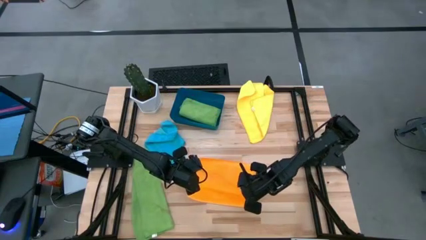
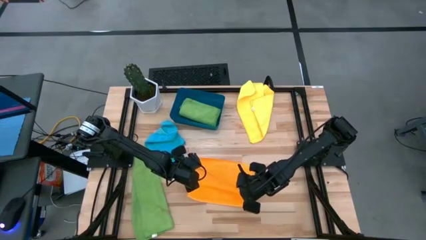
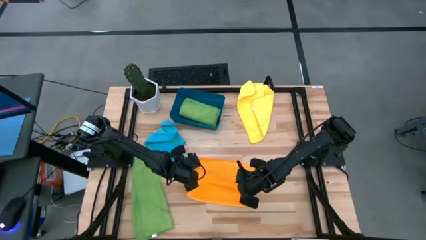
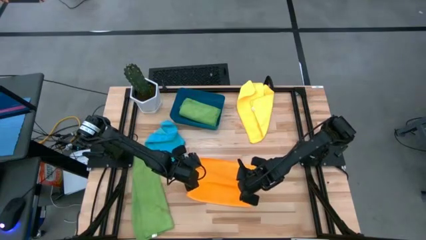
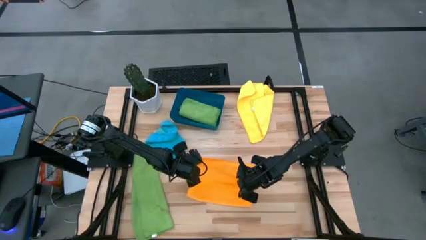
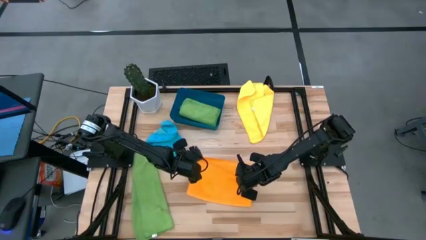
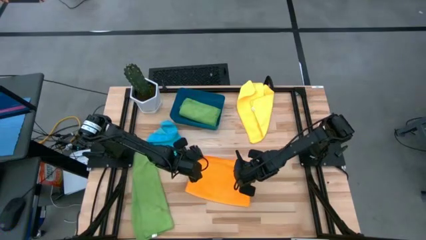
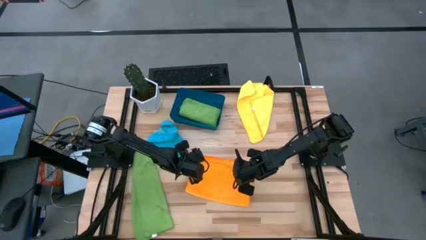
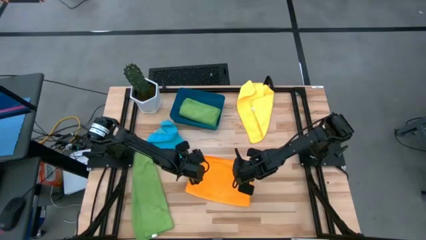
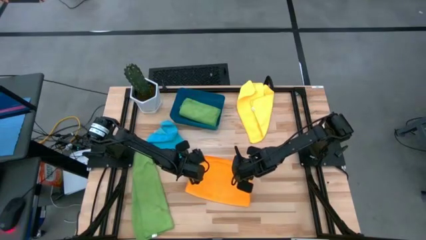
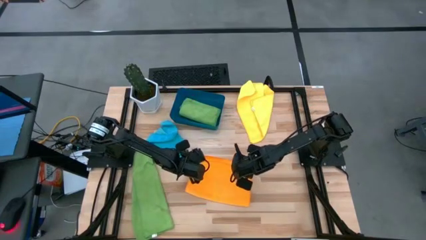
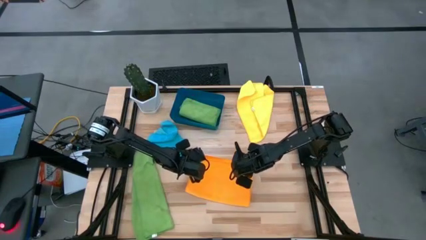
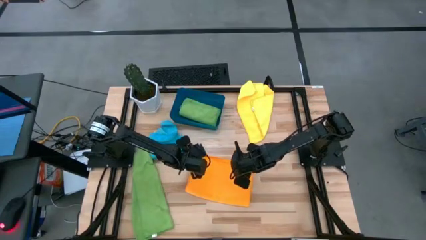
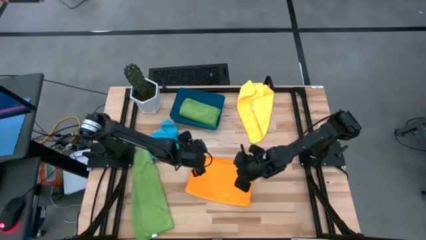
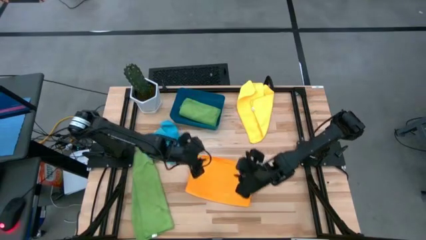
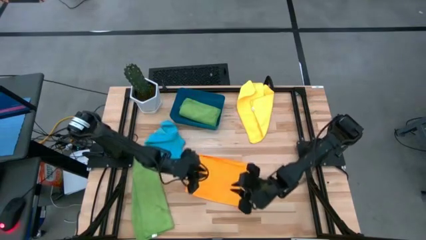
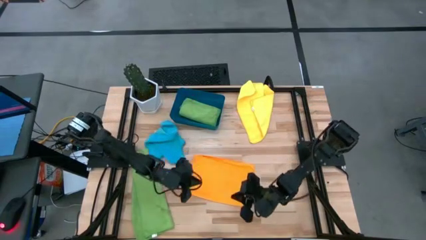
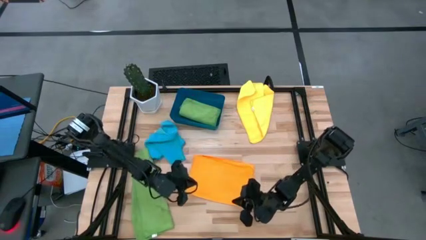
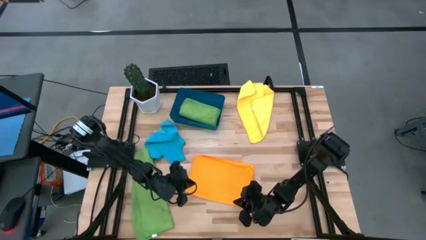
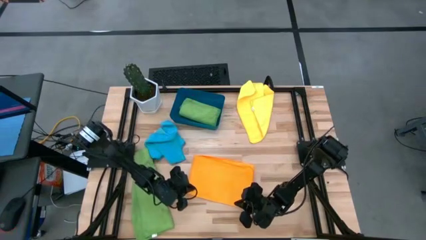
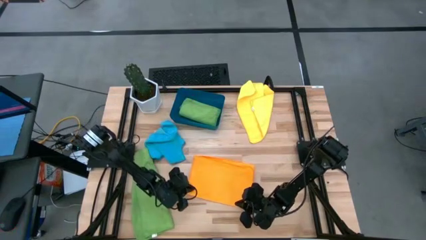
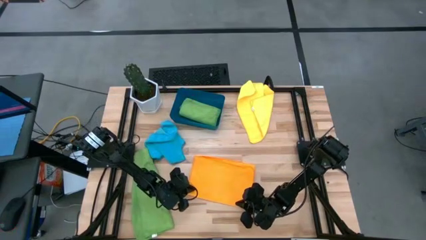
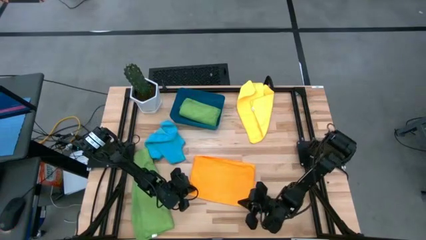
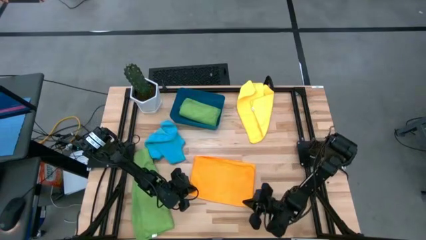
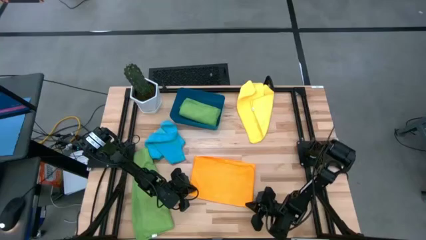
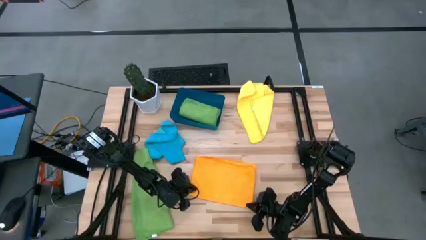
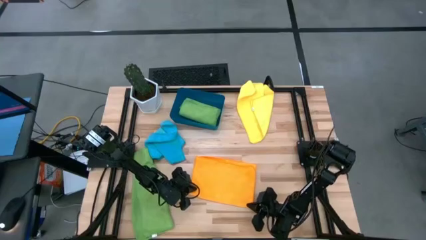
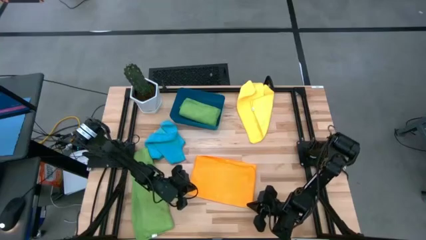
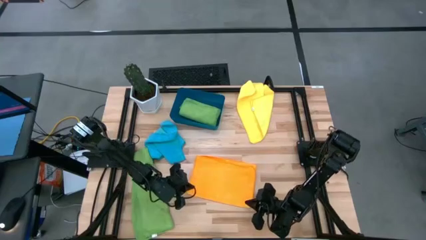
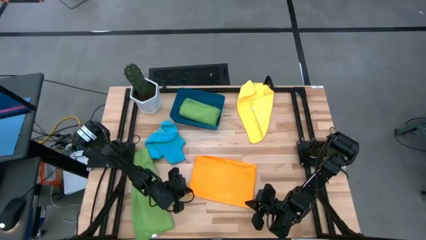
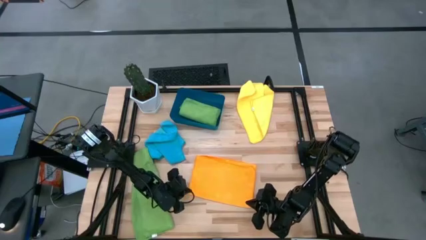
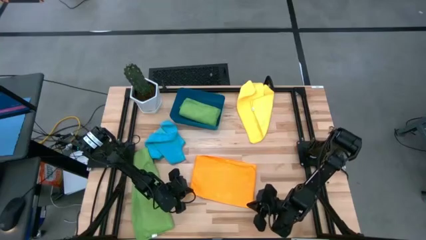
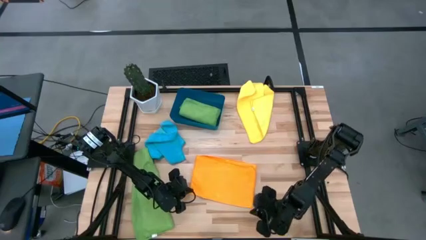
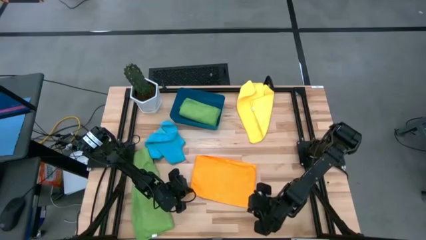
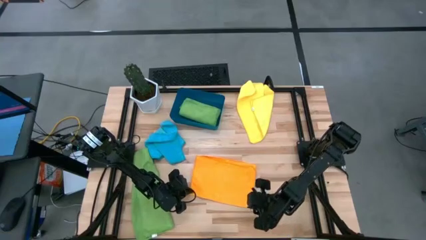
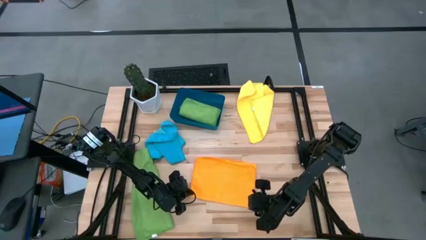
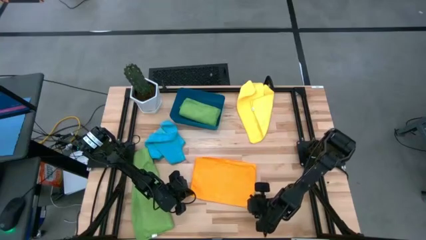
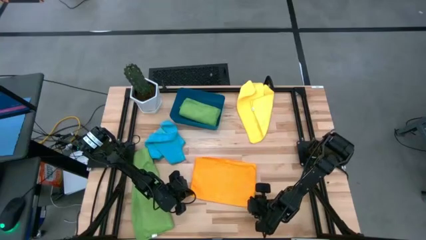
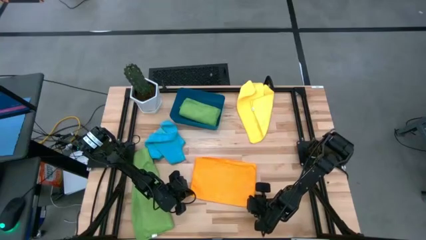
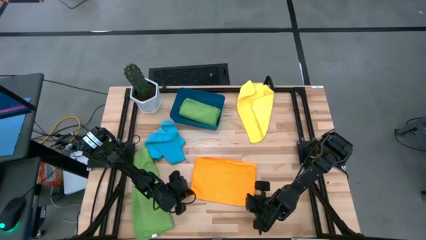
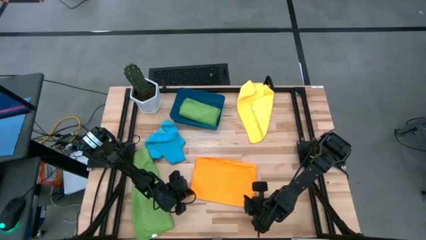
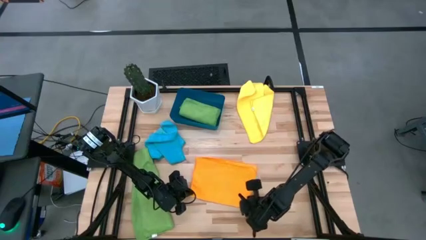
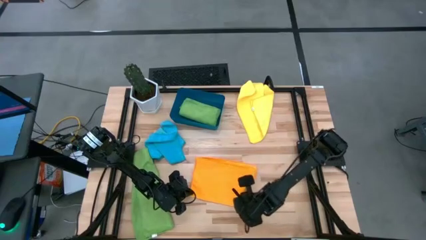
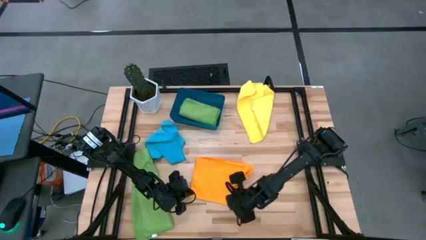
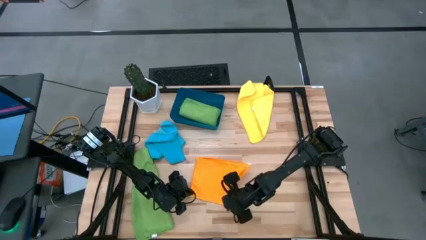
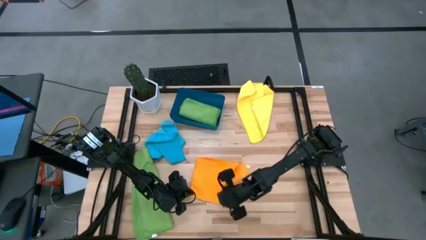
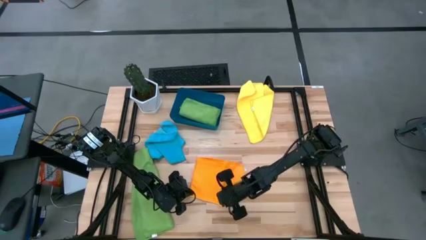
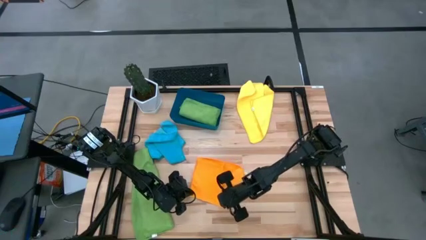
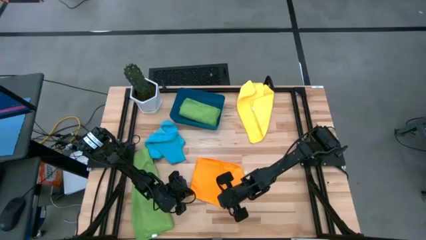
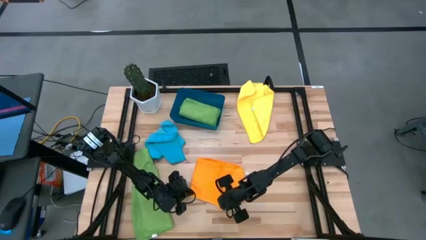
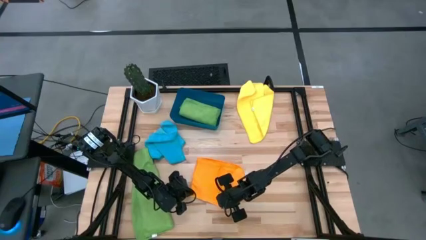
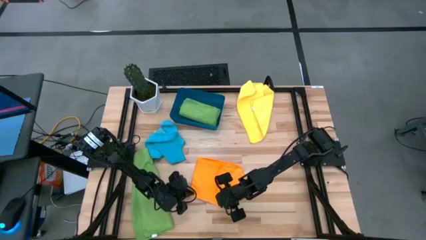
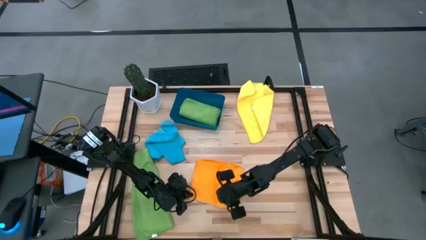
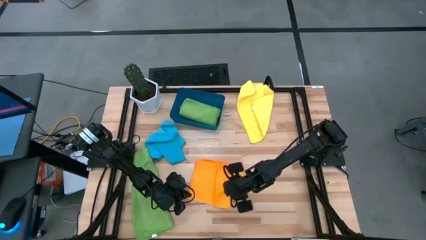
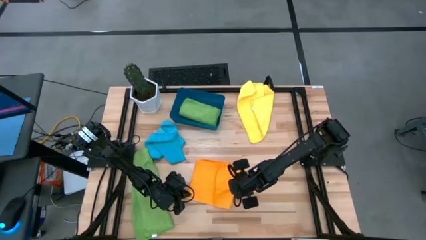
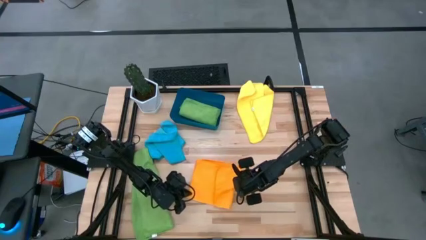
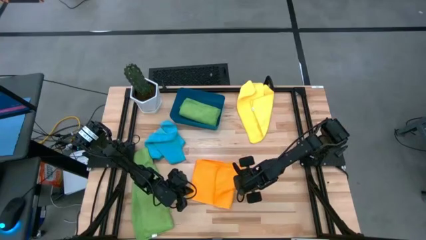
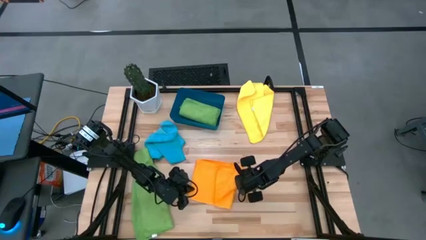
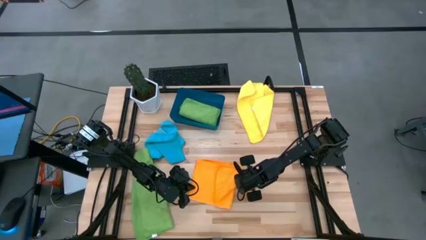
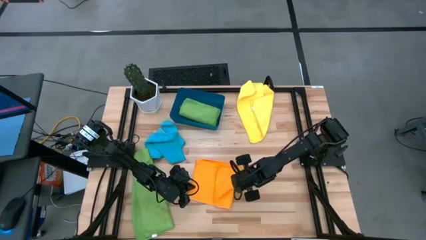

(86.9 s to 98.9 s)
Task: Fold microfiber towels
Fold the orange towel
